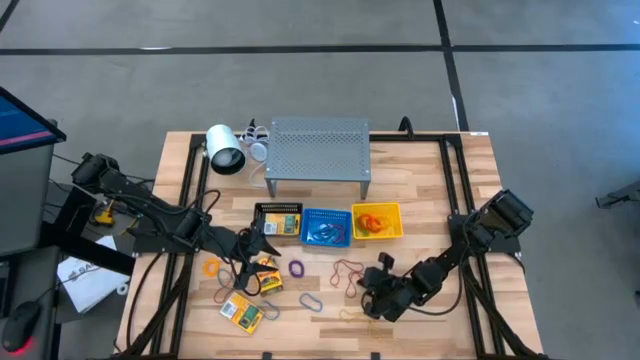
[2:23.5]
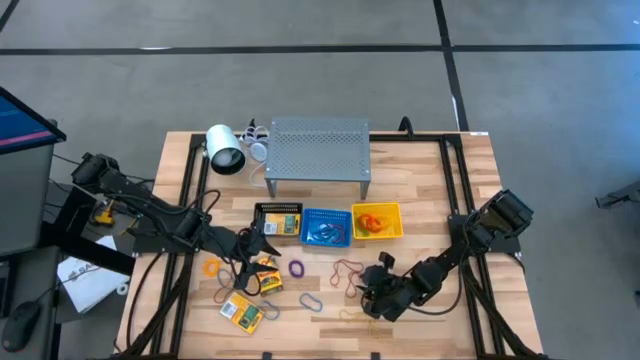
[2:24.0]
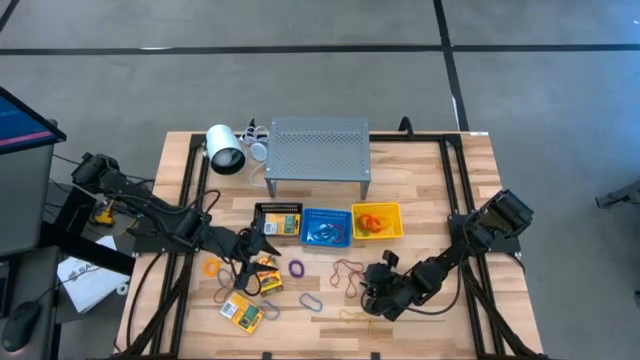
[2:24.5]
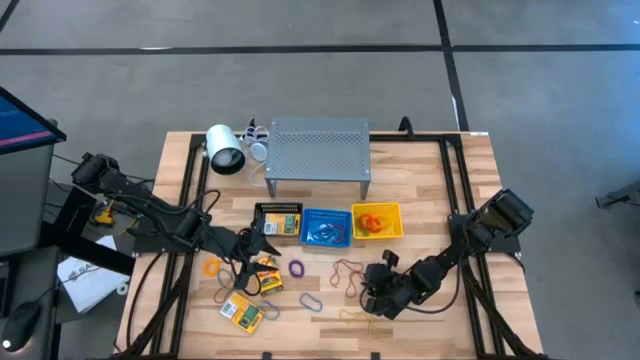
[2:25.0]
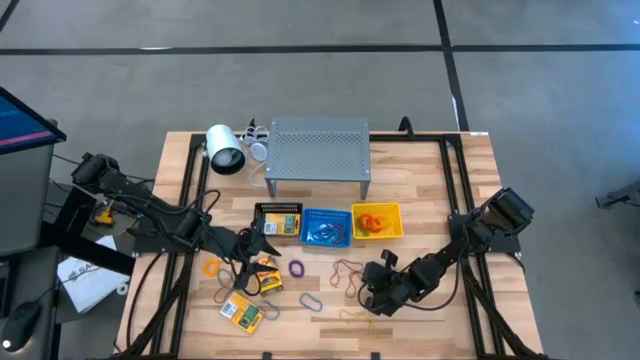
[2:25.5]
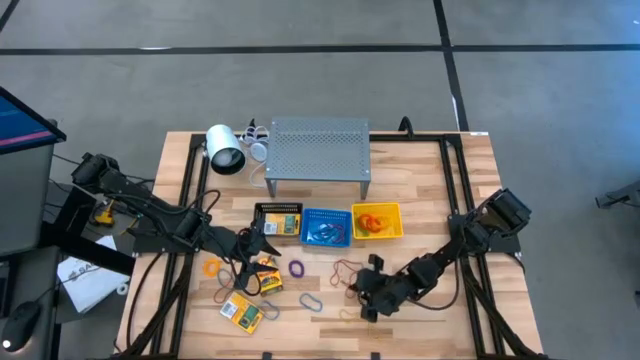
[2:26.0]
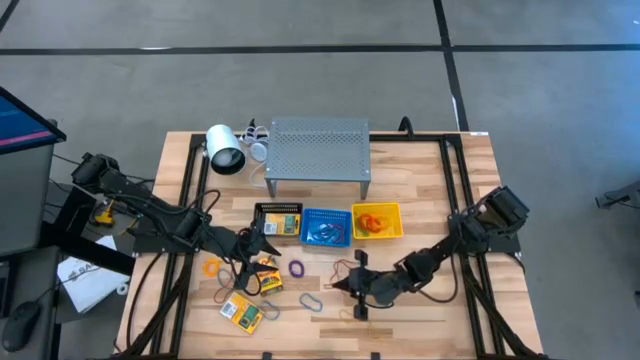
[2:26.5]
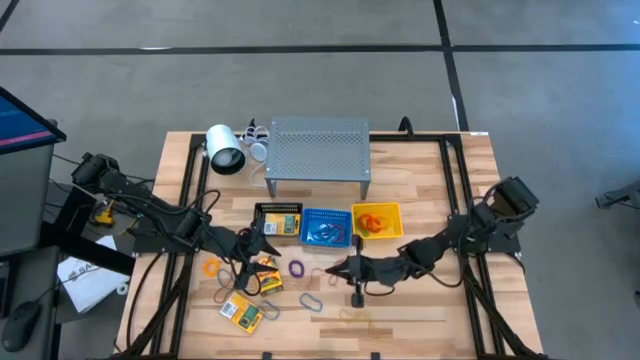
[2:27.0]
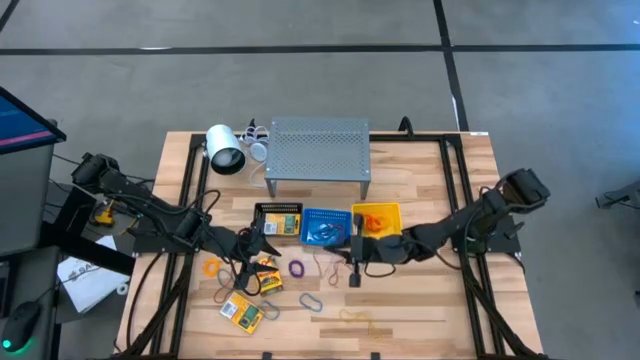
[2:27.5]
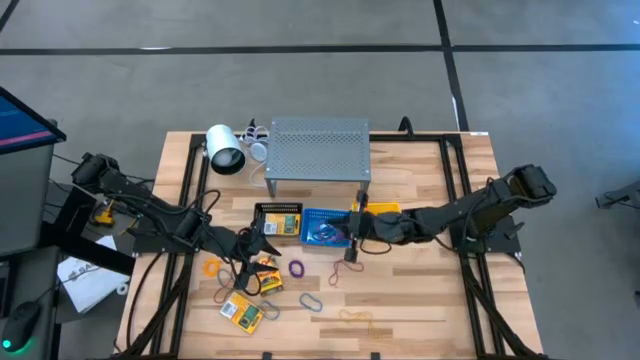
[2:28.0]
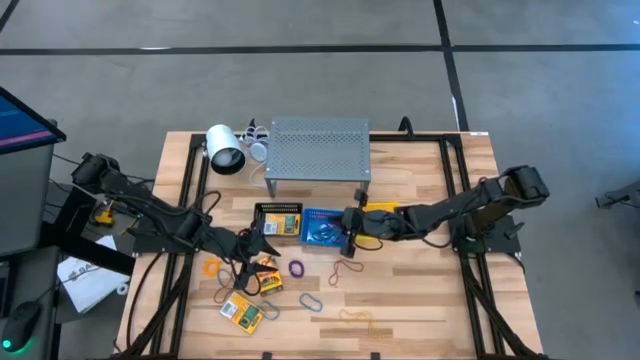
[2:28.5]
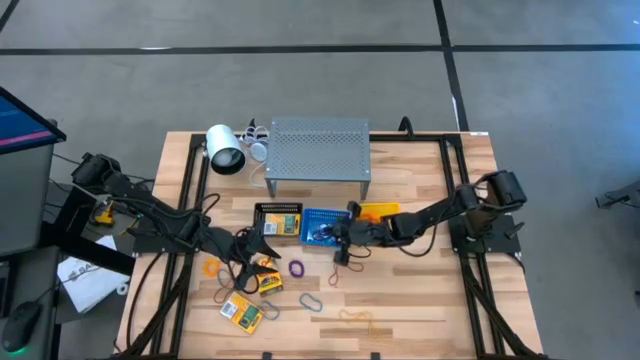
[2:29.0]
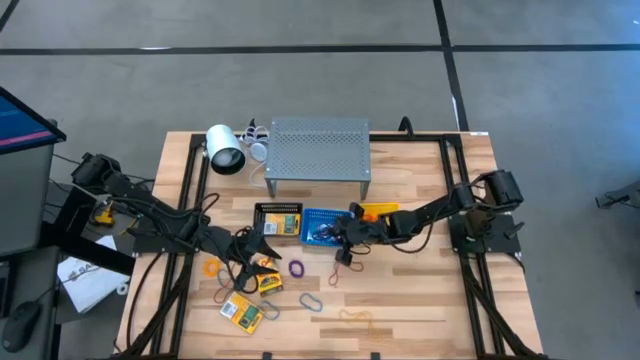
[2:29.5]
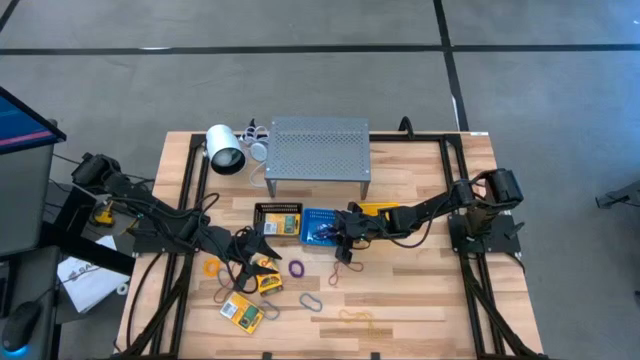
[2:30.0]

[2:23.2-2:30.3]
Task: Pick & Place Office Desk Supplies
Put the red rubber band into the blue bin

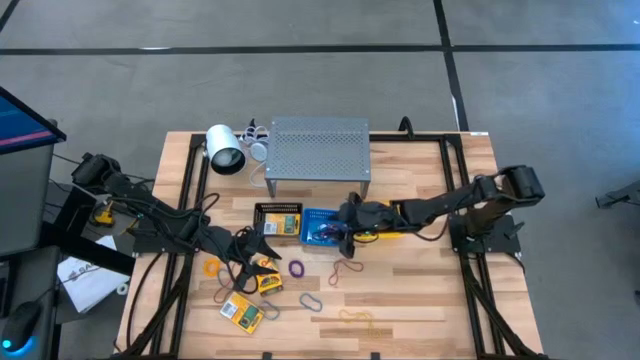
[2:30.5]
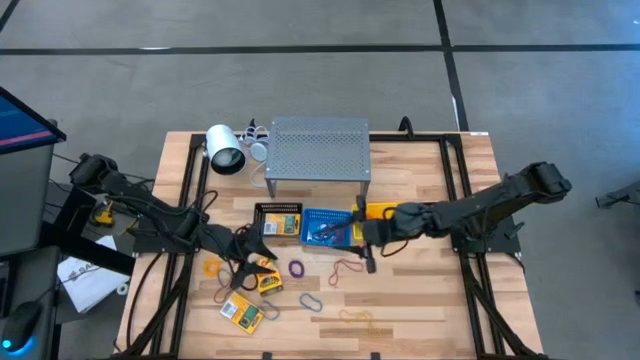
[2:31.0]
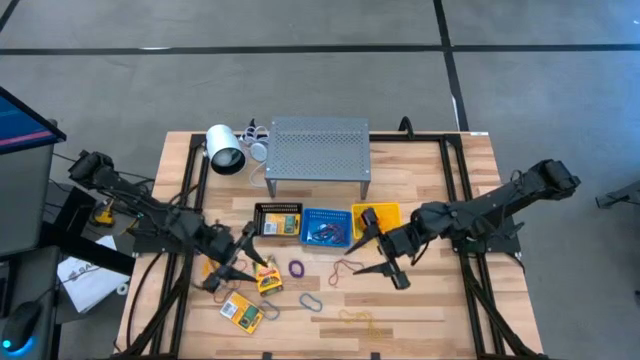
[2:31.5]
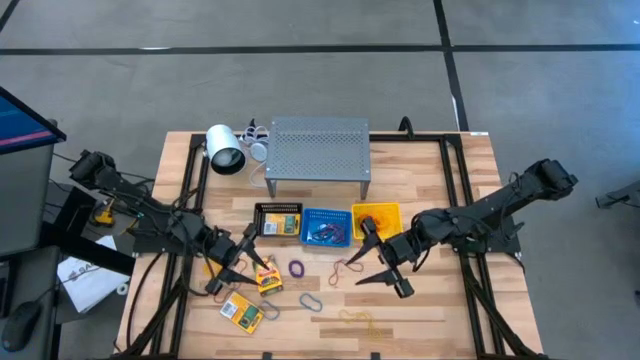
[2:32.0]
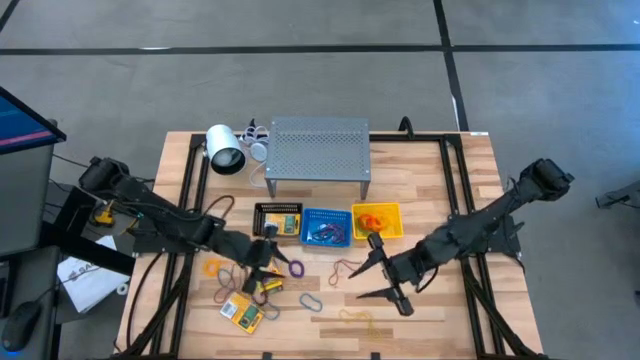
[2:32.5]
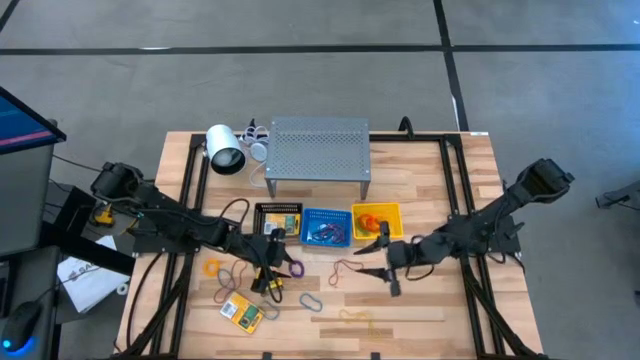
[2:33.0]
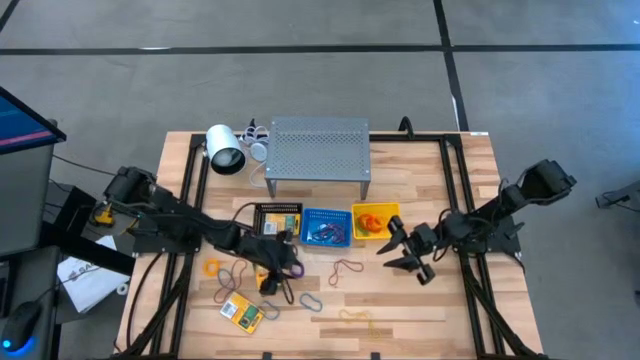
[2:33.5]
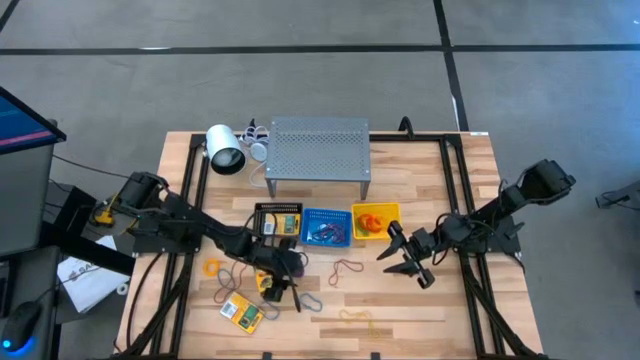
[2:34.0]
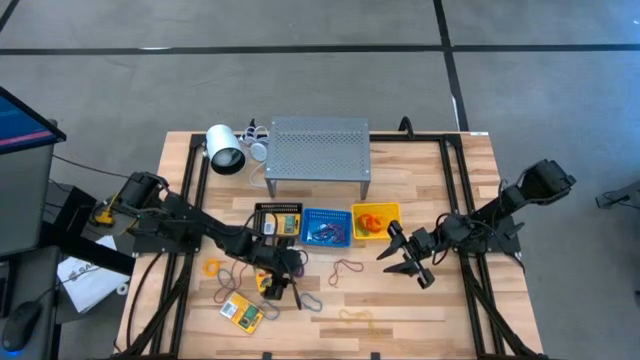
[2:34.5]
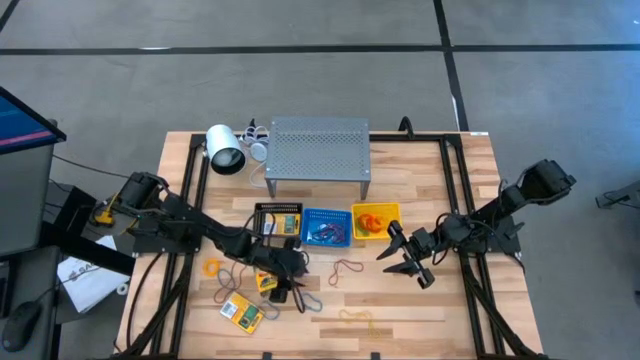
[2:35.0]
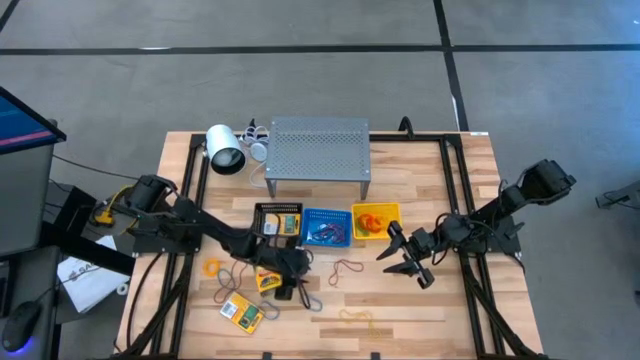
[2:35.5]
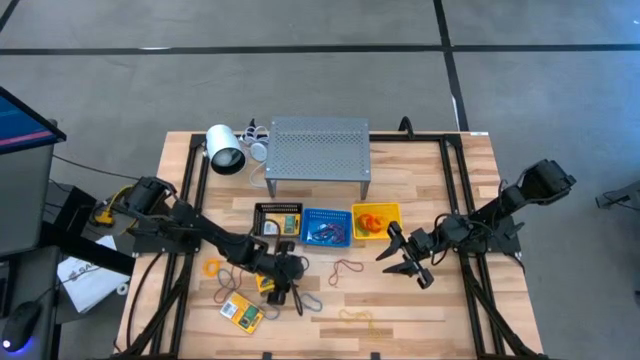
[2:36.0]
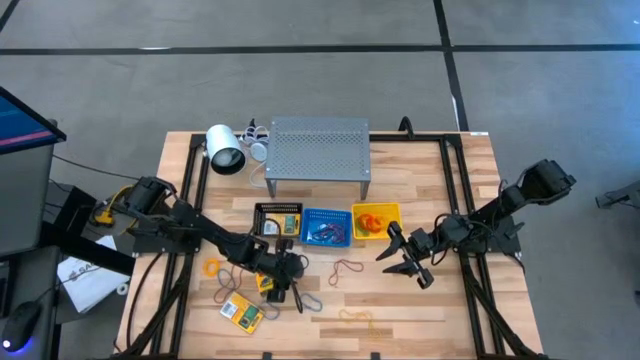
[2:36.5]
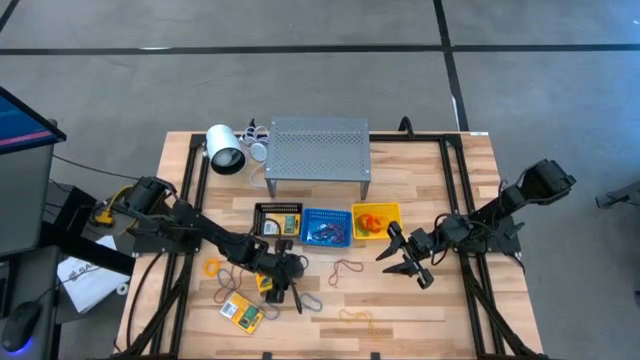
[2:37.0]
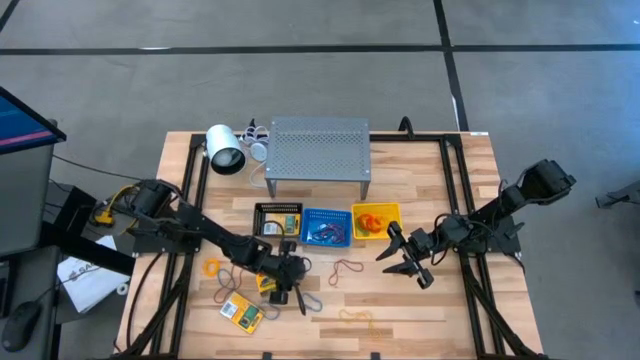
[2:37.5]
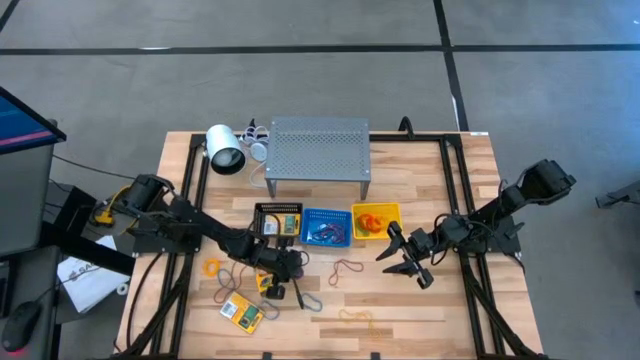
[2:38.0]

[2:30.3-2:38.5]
Put the purple spiral keychain into the yellow bin

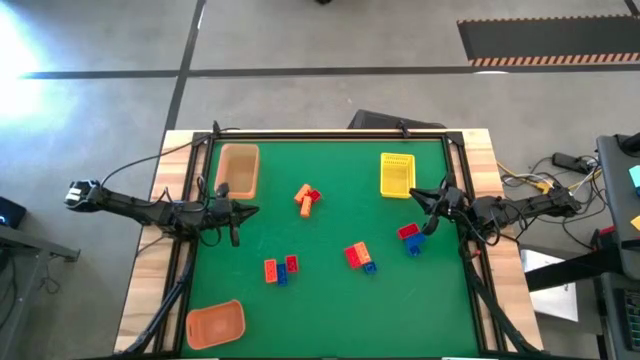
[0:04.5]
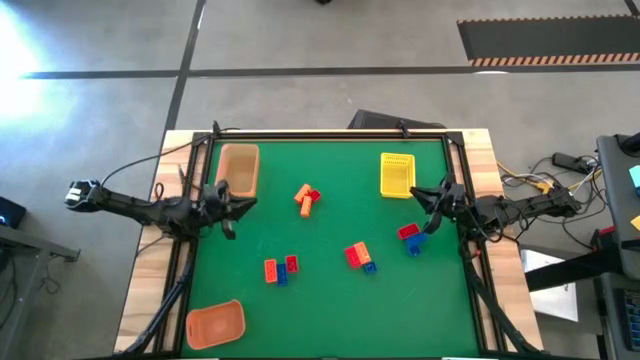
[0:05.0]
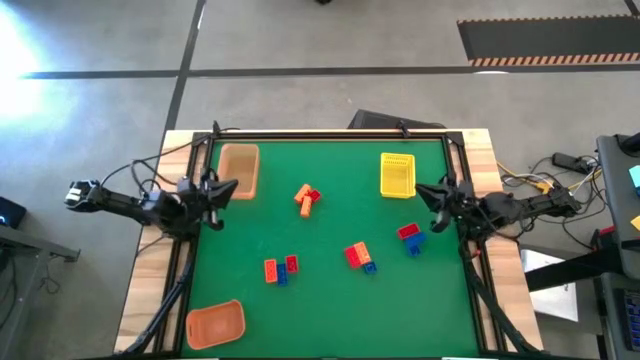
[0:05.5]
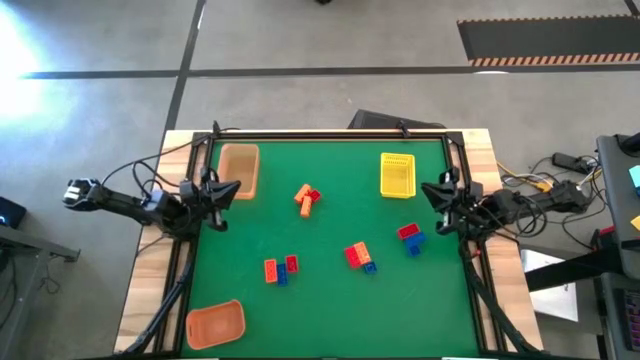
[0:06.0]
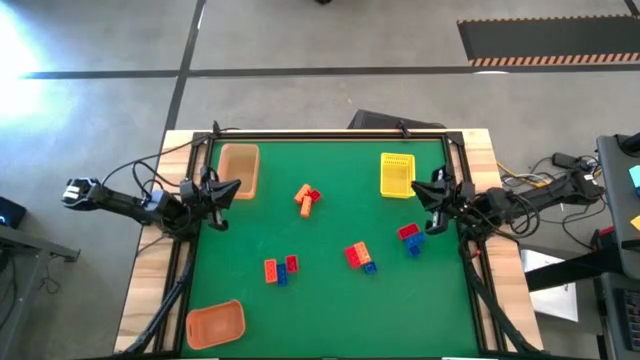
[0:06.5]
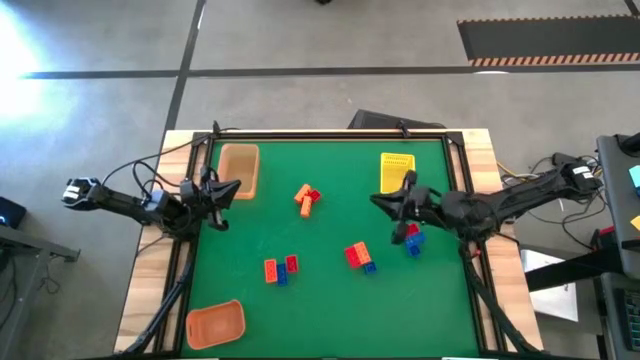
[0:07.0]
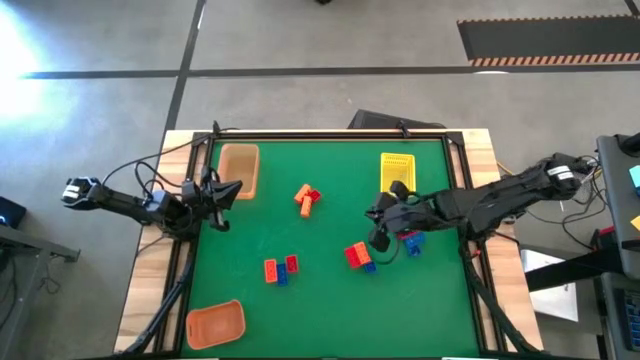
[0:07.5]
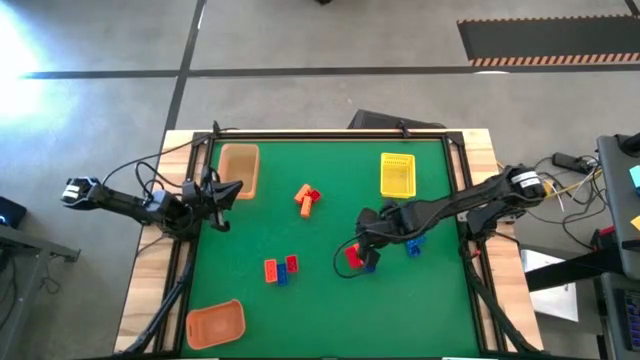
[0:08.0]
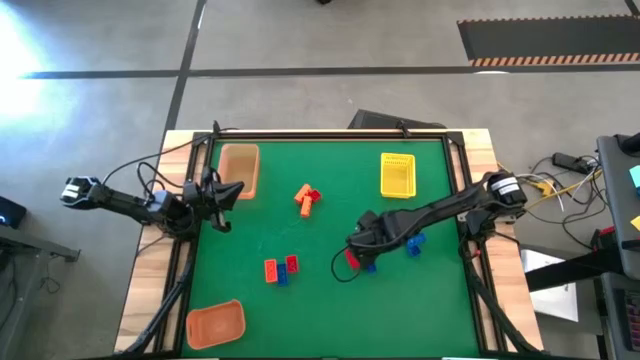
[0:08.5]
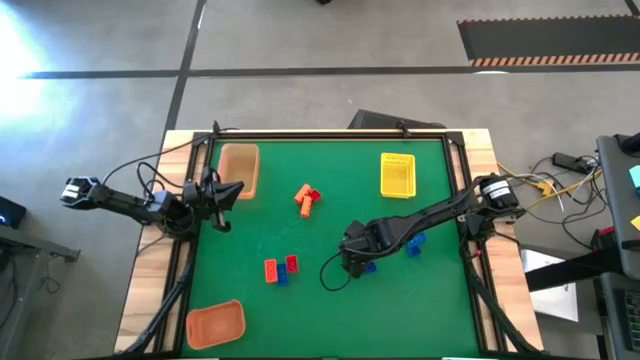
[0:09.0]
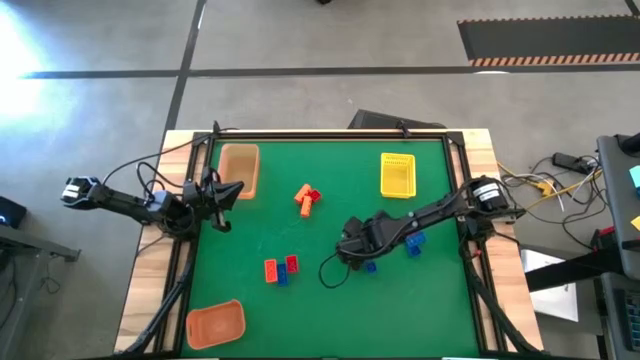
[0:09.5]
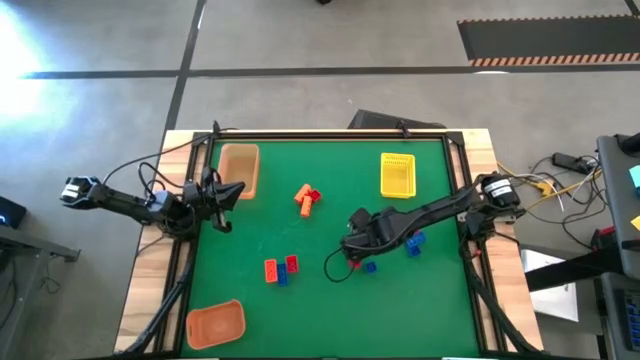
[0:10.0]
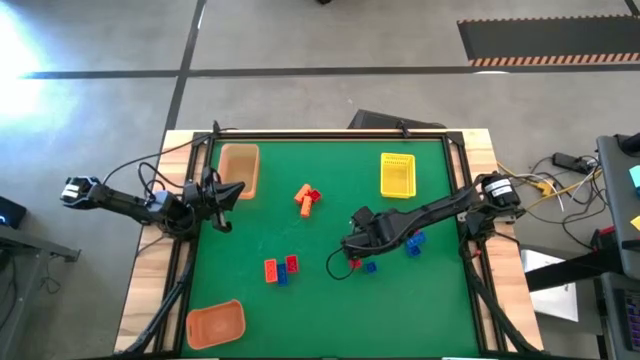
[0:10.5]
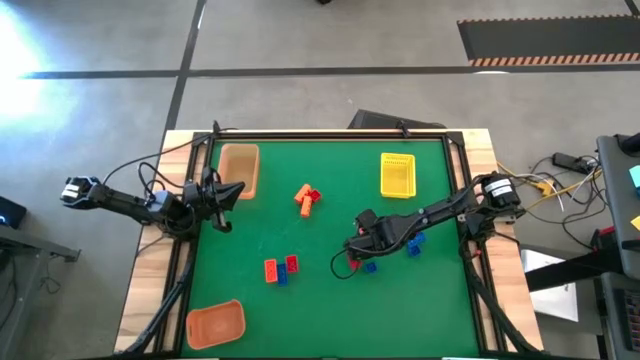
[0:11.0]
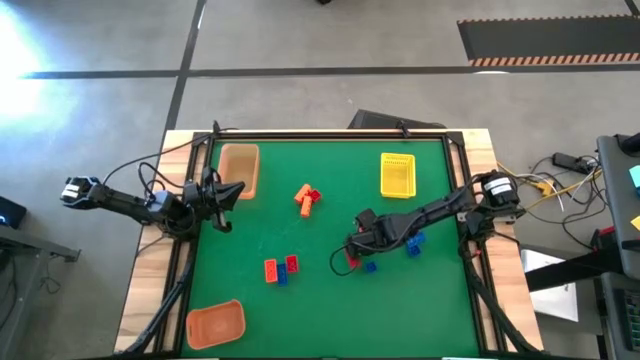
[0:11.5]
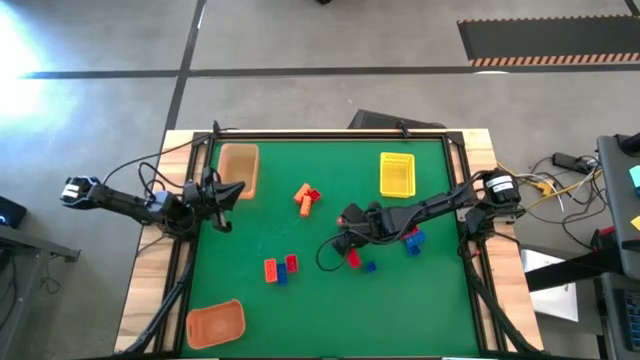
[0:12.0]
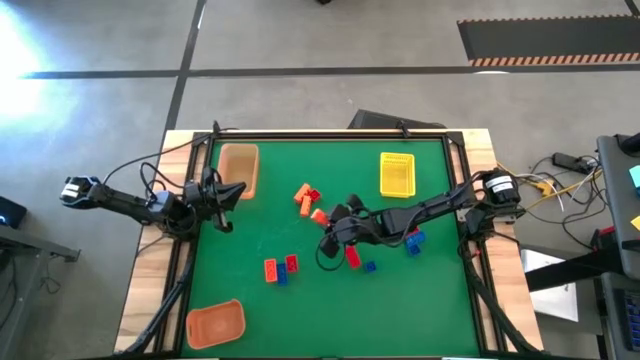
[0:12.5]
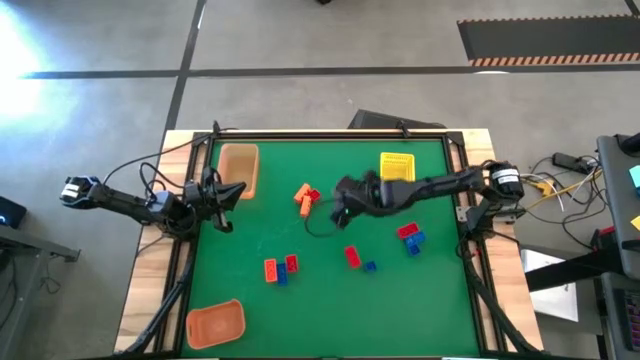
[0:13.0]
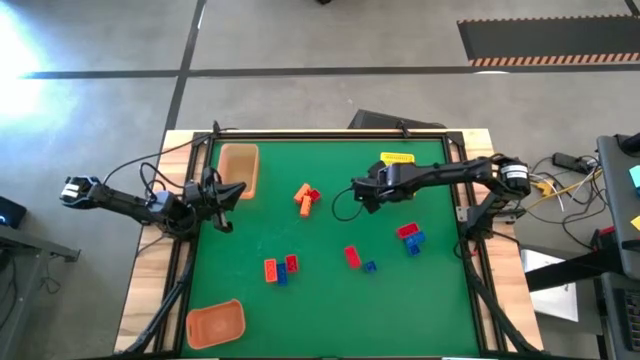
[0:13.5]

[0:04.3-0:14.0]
Task: Sort & place blocks by color
Put the orange game piece into the yellow bin
